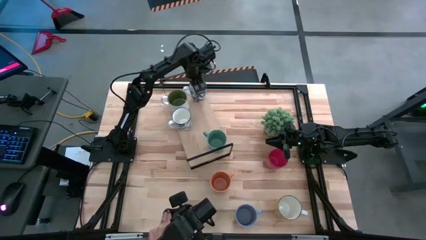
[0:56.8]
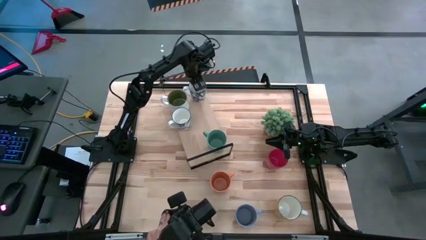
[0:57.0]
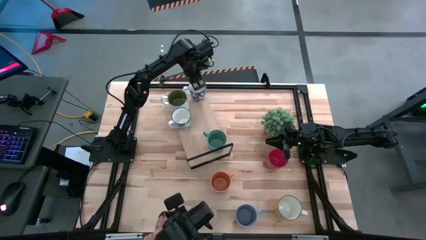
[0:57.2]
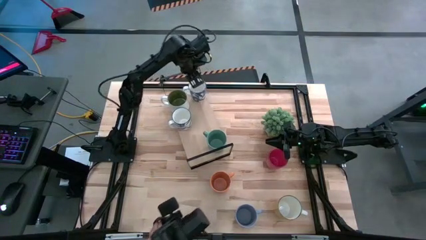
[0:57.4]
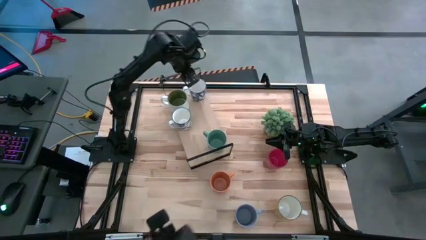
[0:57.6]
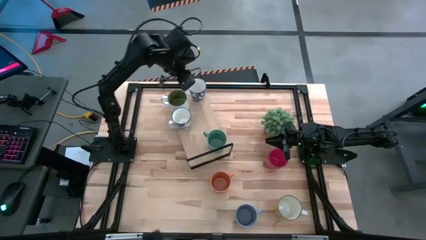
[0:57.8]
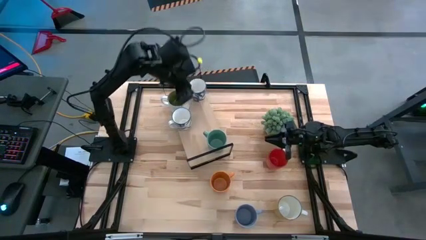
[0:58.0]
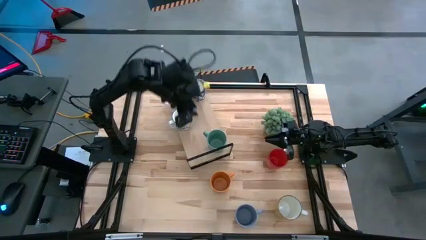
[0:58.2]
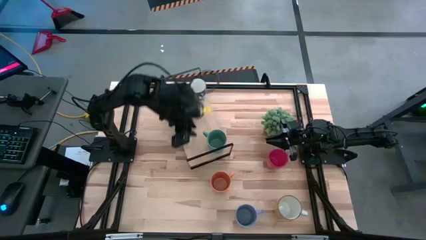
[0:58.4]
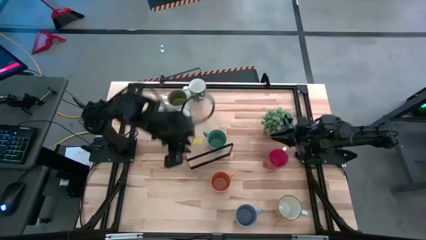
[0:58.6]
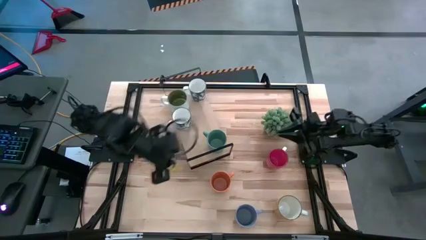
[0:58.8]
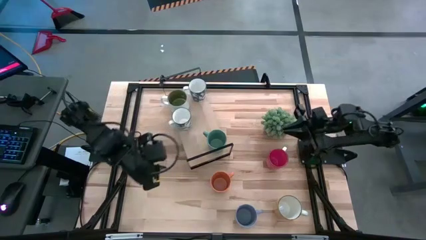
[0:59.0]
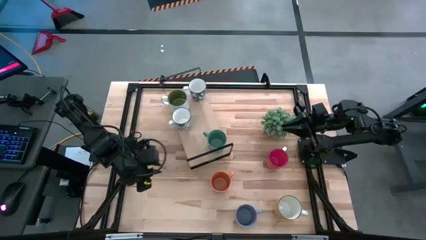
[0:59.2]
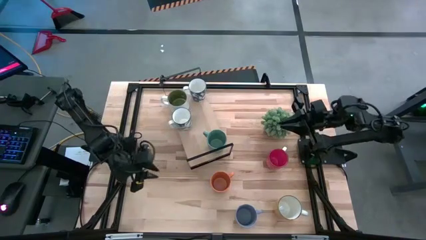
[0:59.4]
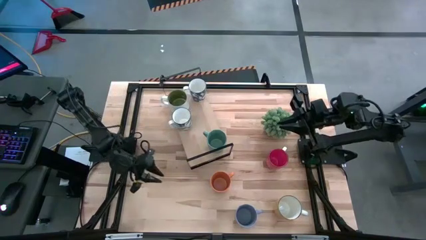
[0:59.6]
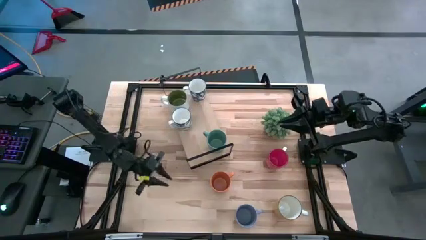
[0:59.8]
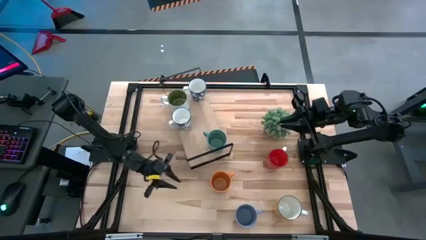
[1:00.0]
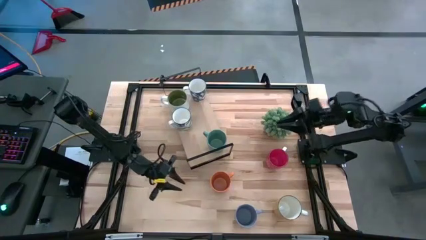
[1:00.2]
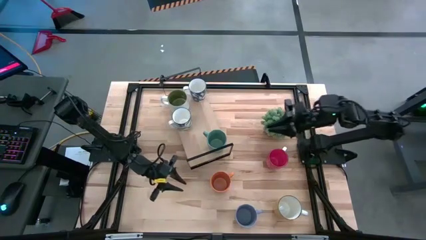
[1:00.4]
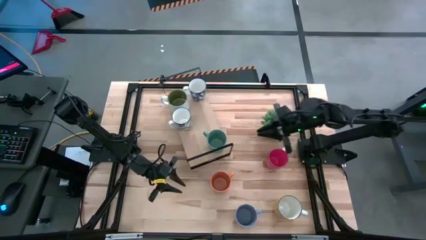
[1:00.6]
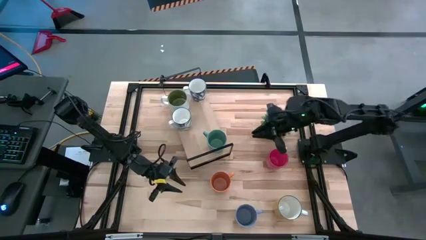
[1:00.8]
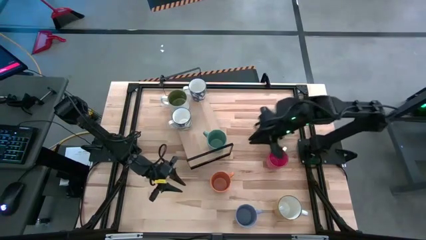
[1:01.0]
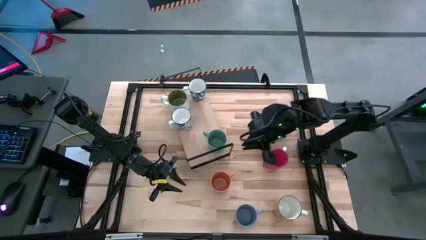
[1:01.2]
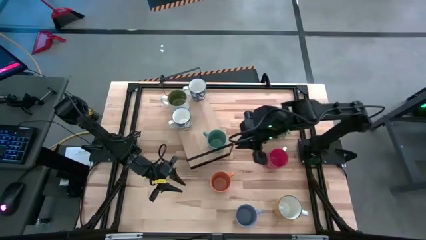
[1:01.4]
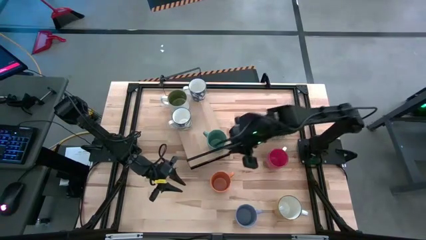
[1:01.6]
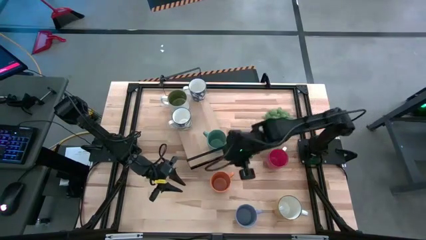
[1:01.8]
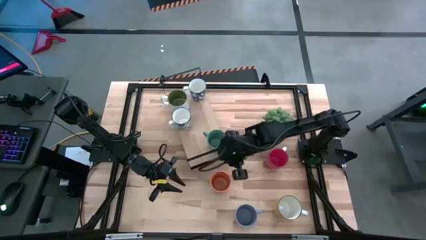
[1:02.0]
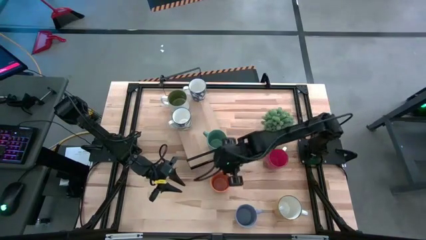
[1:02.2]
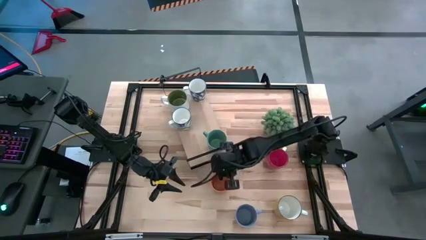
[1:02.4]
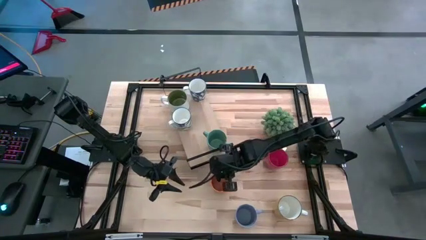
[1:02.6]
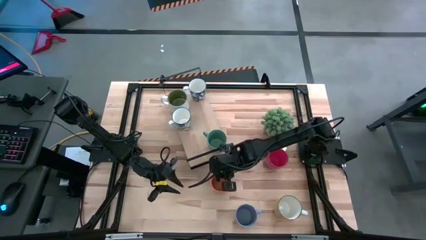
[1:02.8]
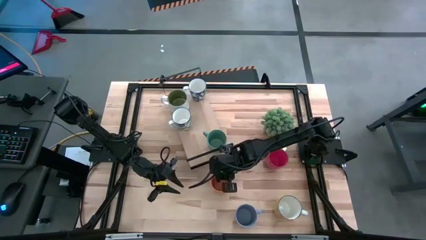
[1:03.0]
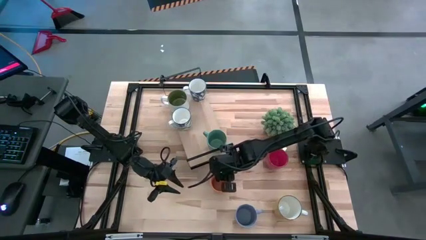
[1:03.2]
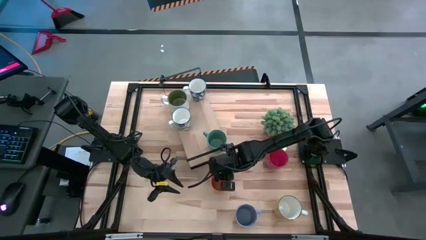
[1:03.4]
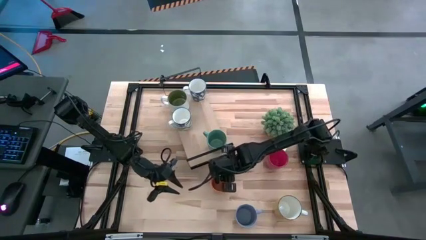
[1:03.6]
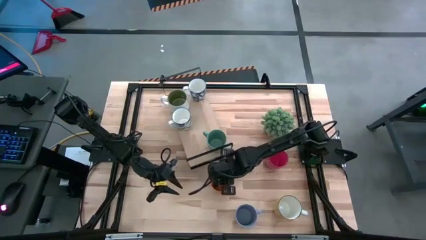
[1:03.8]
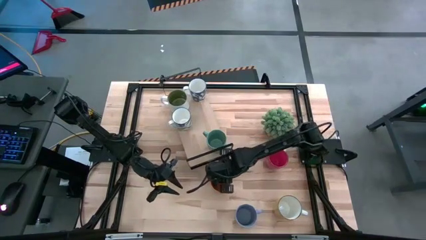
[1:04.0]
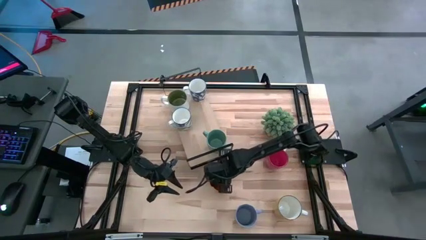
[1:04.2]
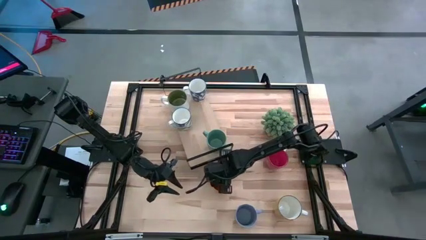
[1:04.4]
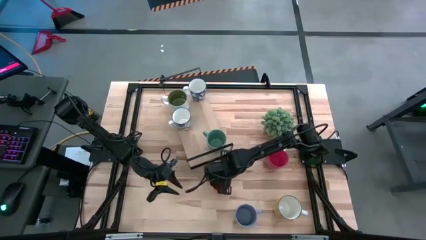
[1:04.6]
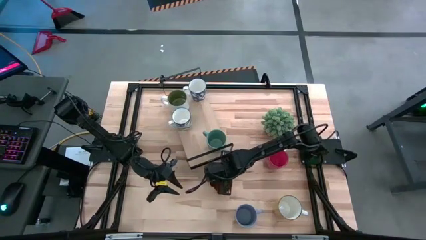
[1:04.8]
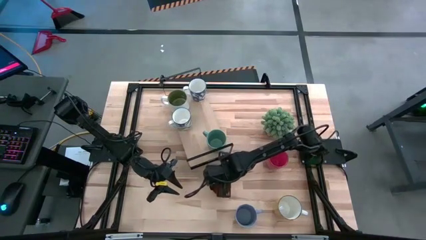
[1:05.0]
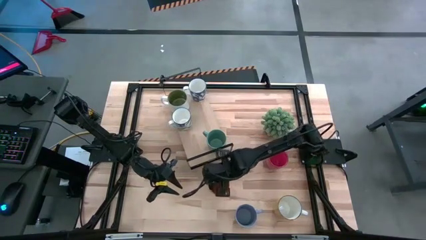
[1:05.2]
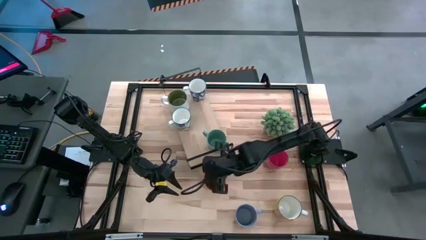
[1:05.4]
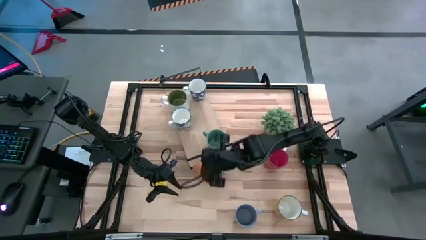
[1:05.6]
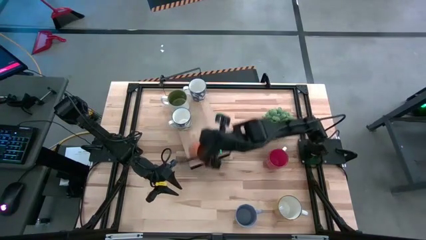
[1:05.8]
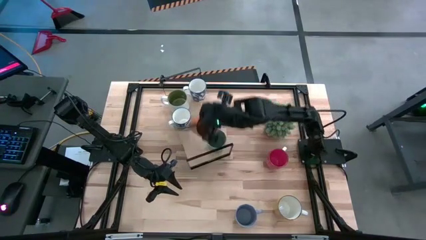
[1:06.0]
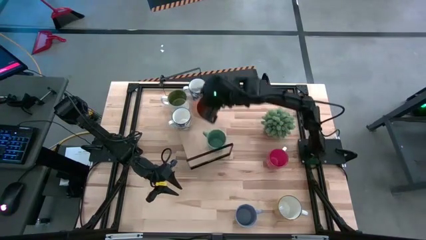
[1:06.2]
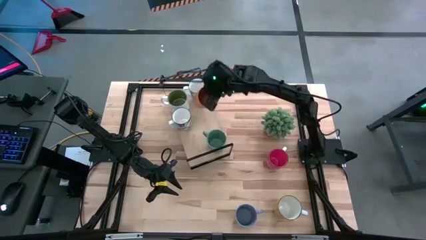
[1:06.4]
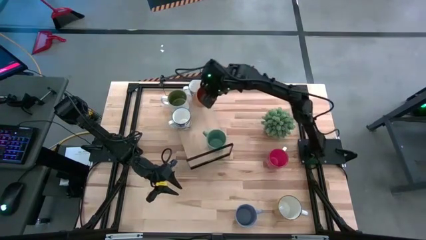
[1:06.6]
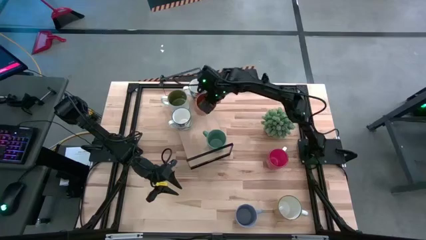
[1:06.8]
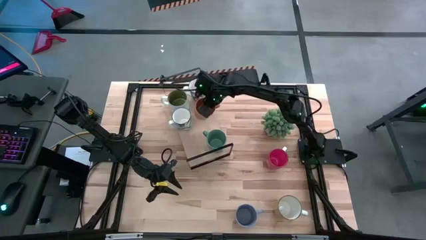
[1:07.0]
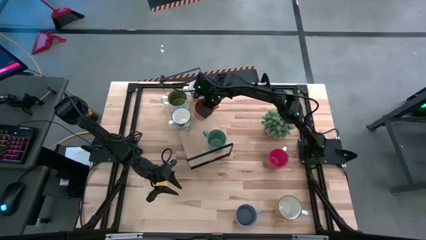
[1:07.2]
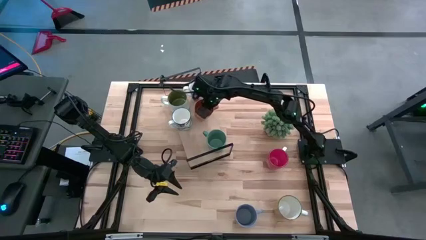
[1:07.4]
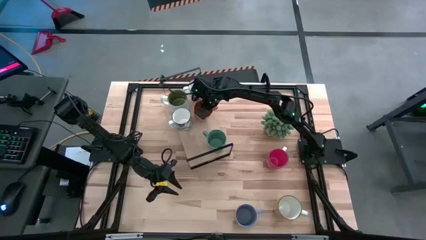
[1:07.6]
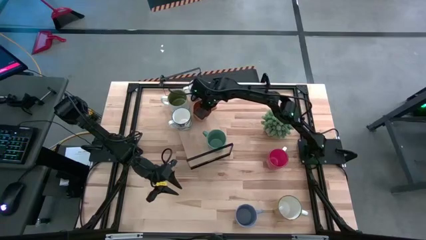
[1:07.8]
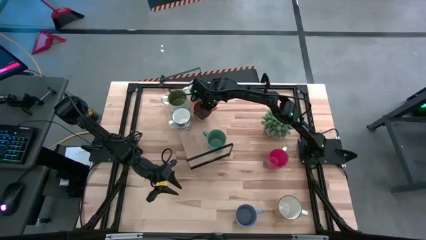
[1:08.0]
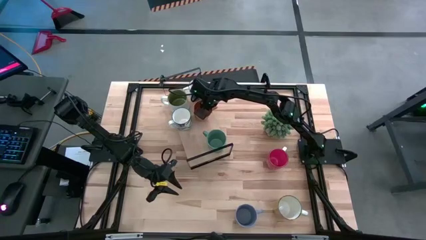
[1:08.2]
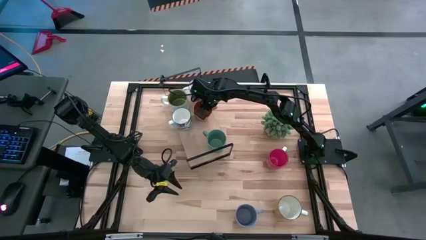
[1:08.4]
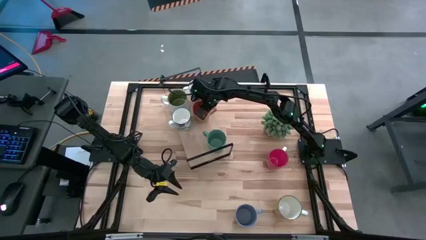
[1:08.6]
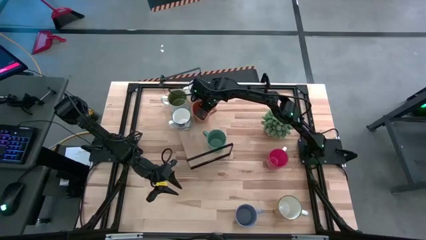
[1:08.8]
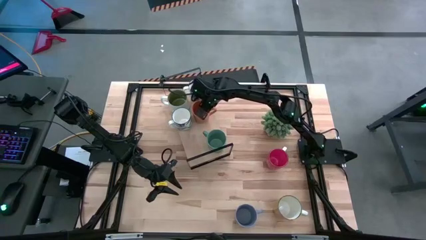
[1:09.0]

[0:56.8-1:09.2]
Task: Place coffee mugs
Put the orange mug on the shelf

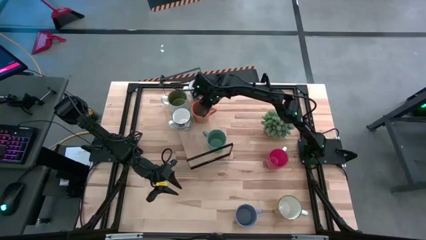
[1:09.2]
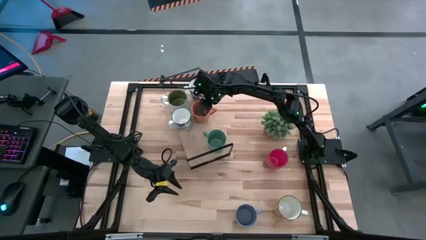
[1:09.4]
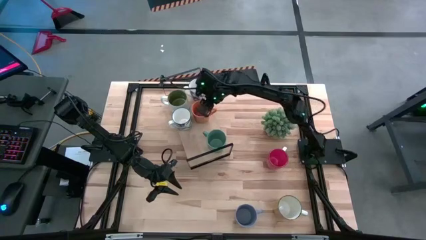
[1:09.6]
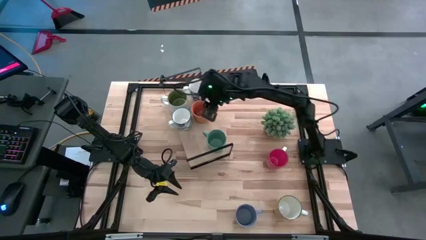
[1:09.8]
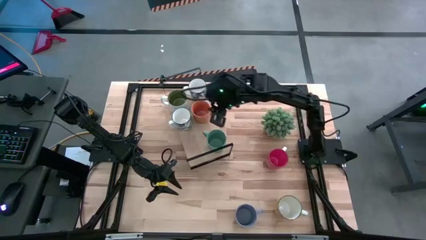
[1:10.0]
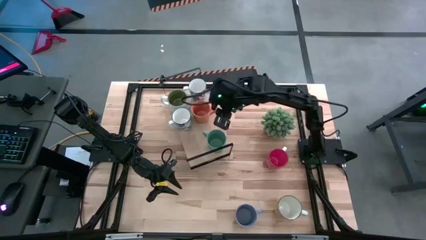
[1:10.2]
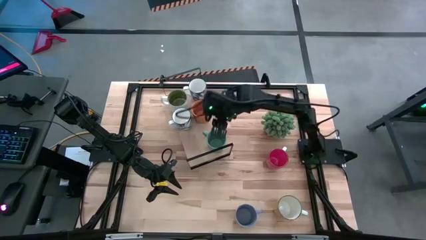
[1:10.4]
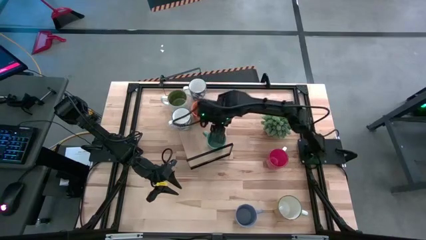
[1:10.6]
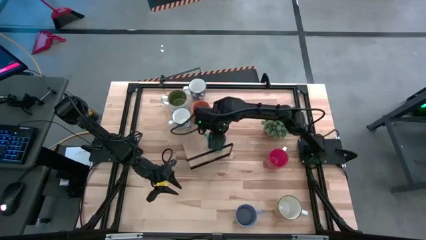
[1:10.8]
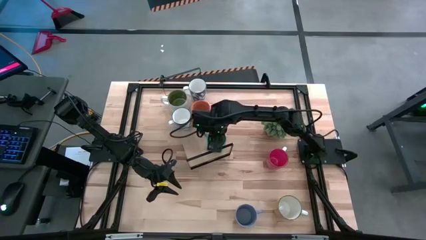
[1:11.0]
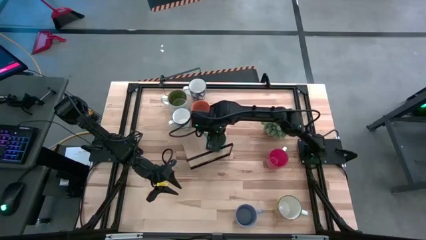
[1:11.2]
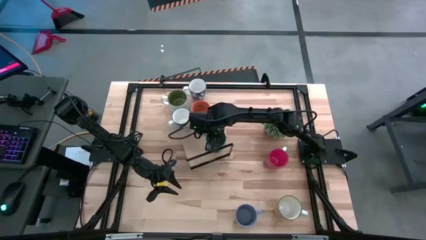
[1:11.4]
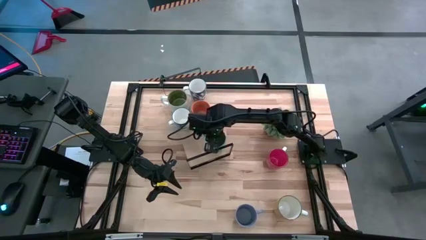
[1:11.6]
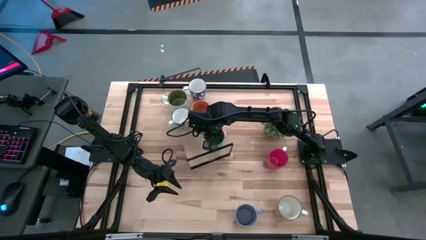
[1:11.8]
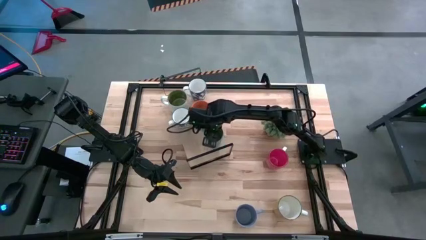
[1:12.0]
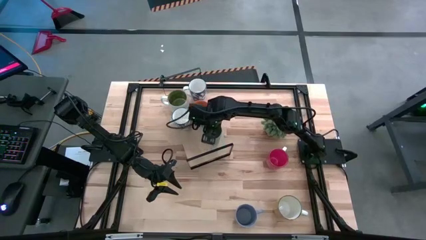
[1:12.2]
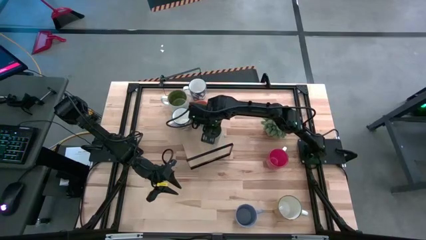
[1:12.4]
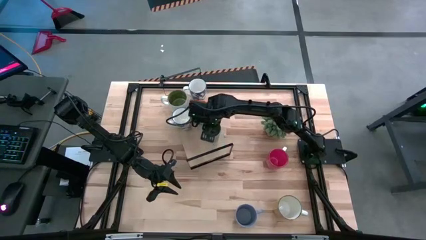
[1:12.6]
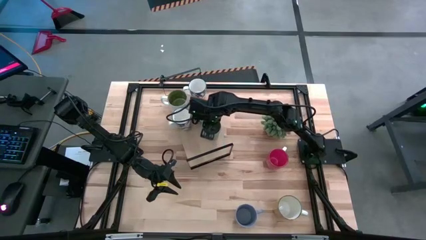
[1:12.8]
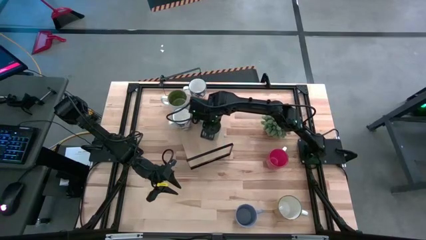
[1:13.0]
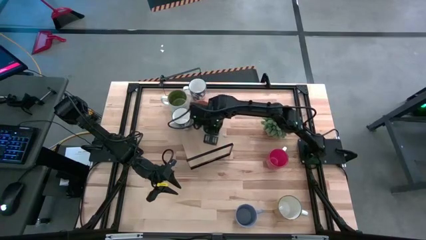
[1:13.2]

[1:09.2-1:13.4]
Adjust the green mug on the shelf
